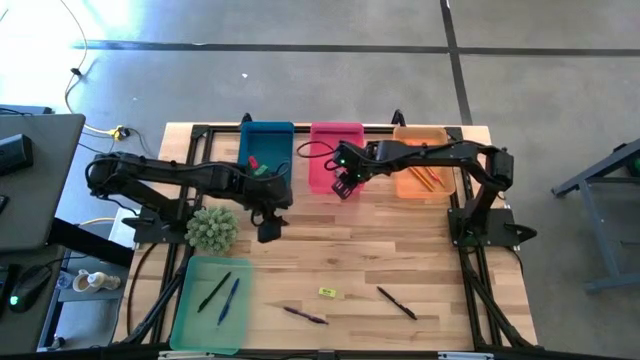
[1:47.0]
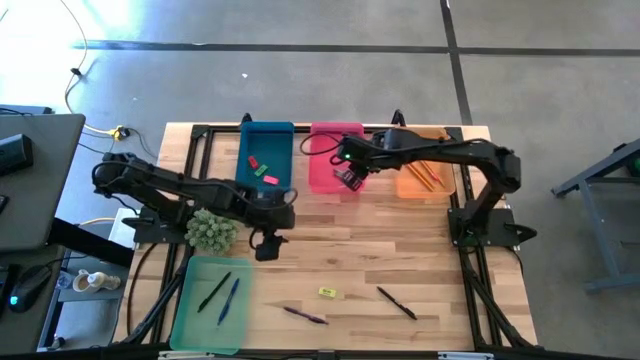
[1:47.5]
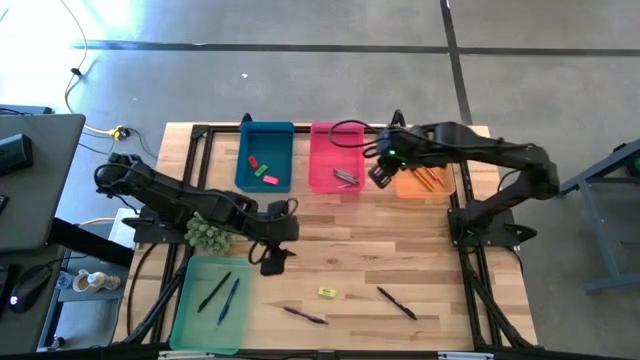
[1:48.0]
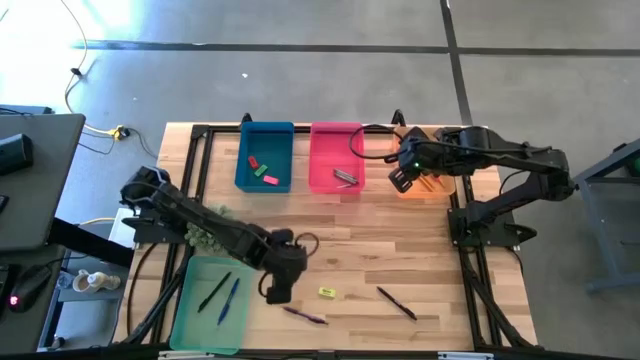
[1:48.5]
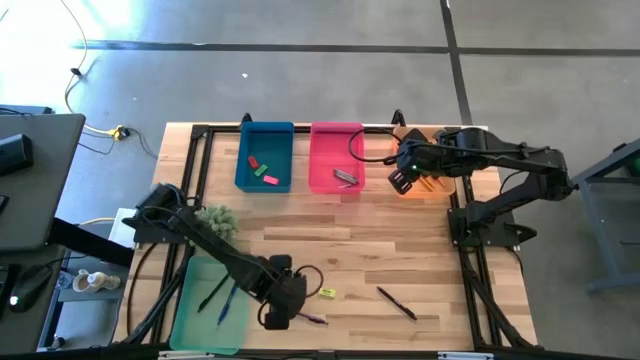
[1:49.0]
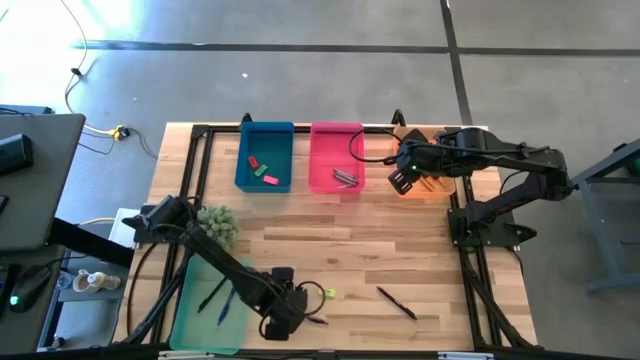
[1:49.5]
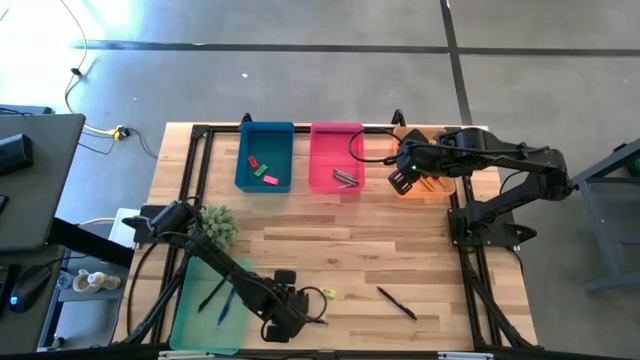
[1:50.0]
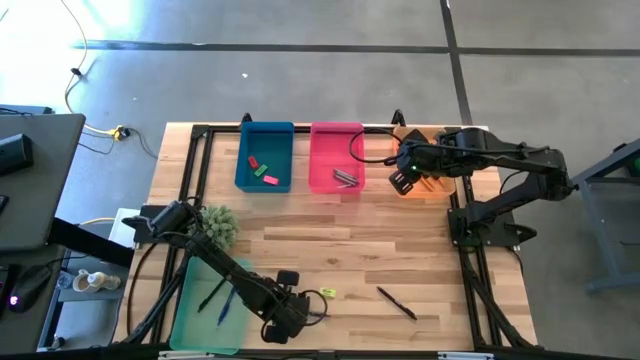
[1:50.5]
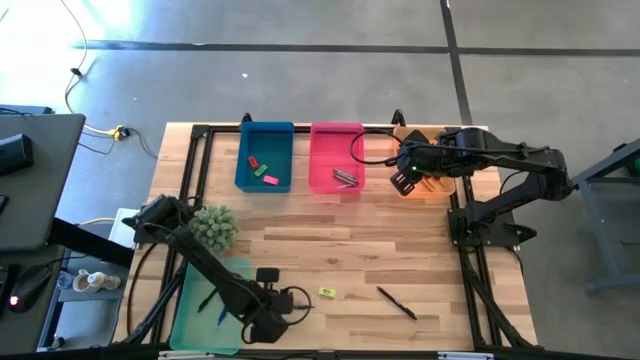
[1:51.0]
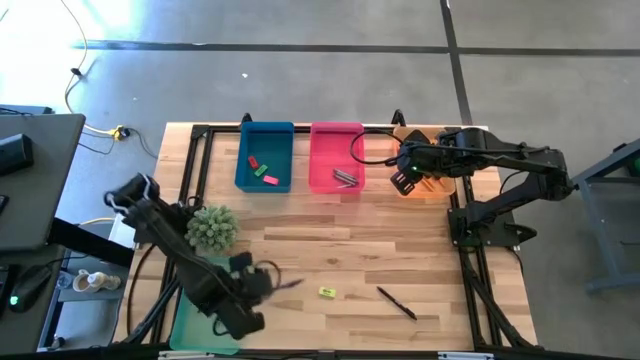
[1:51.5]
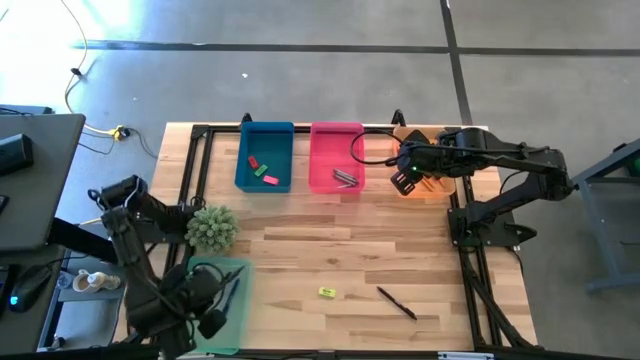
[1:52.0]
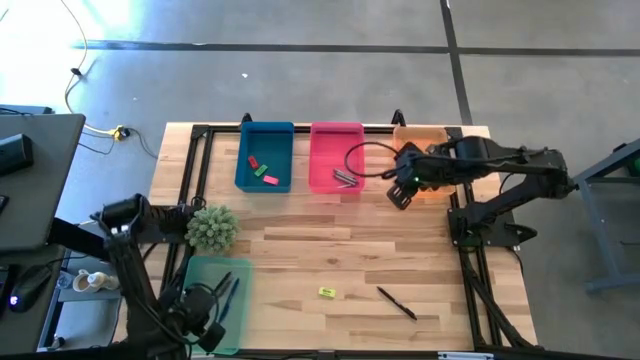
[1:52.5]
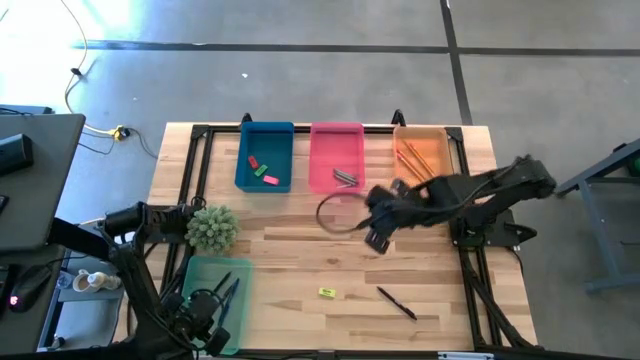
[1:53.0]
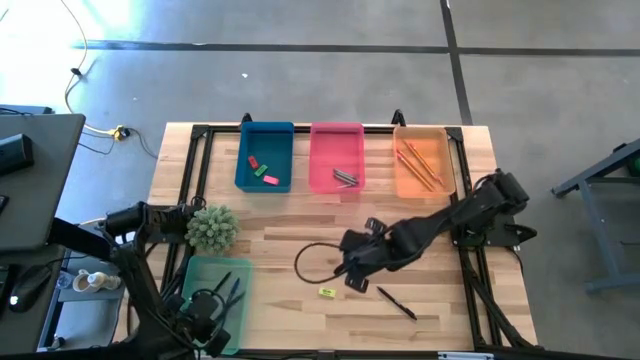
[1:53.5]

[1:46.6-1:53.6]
Task: Sort crayons/erasers/pens/pencils in bins
Put the purple pen into the blue bin

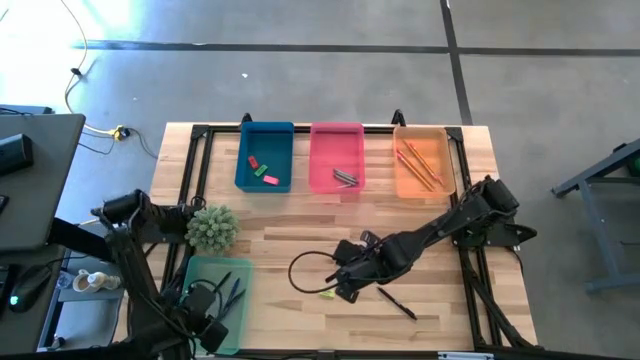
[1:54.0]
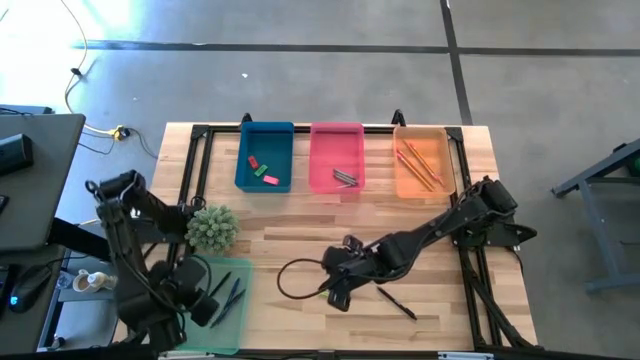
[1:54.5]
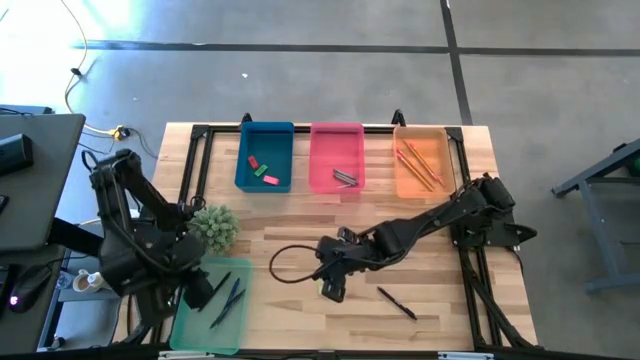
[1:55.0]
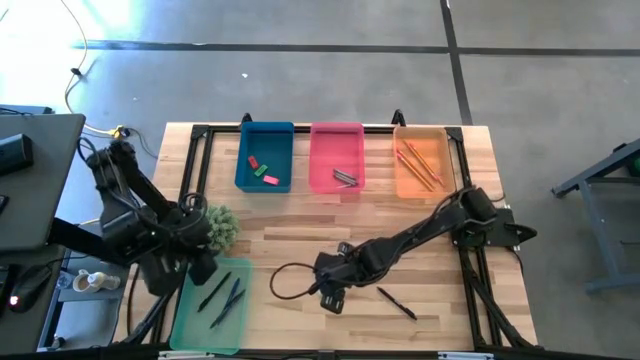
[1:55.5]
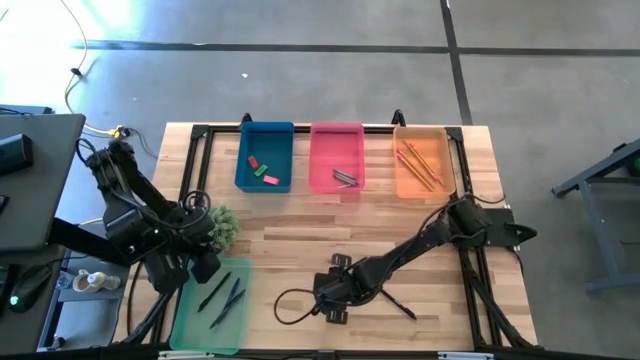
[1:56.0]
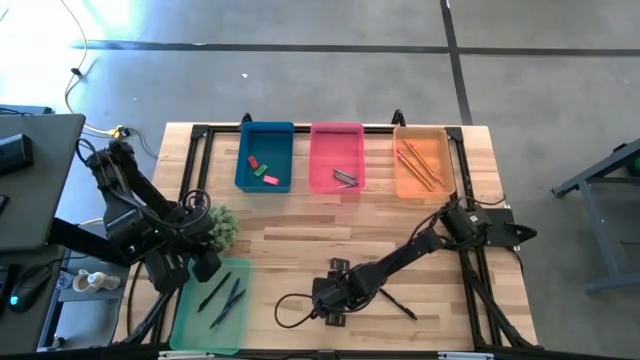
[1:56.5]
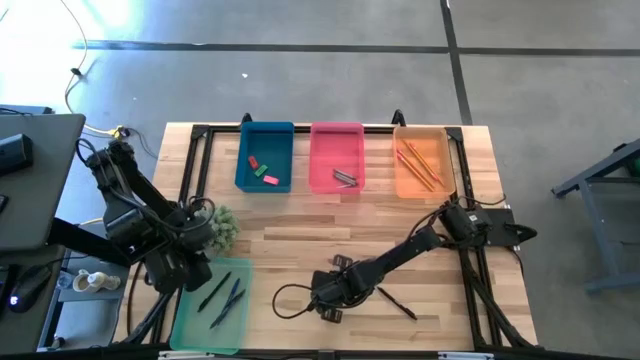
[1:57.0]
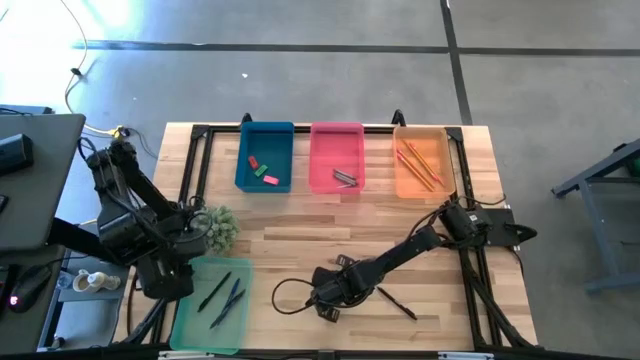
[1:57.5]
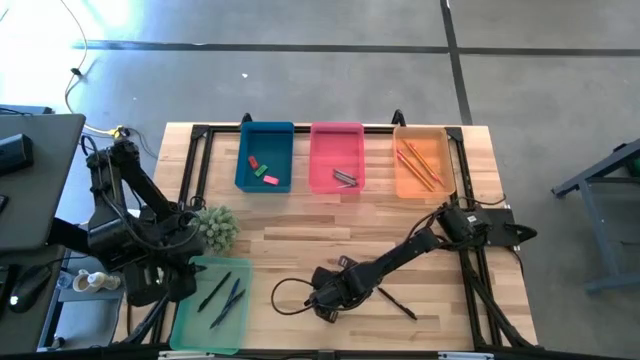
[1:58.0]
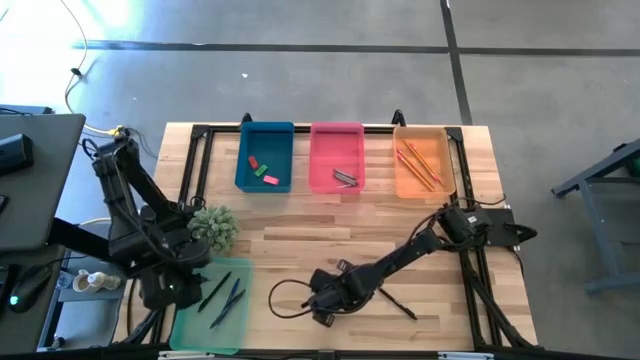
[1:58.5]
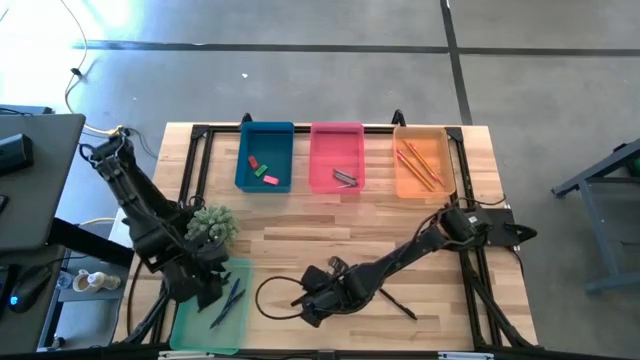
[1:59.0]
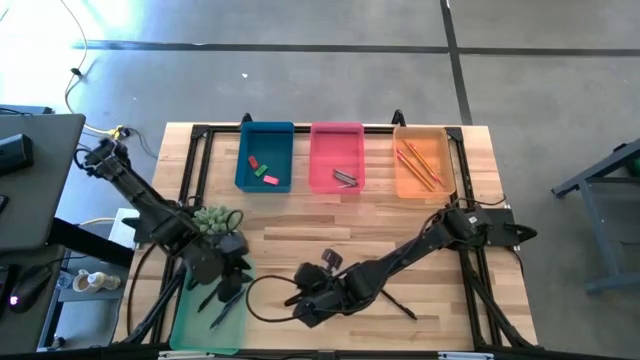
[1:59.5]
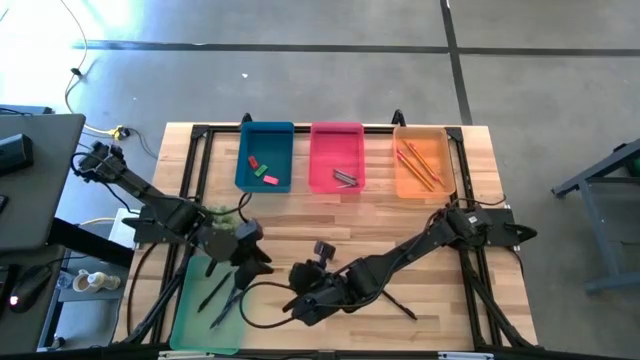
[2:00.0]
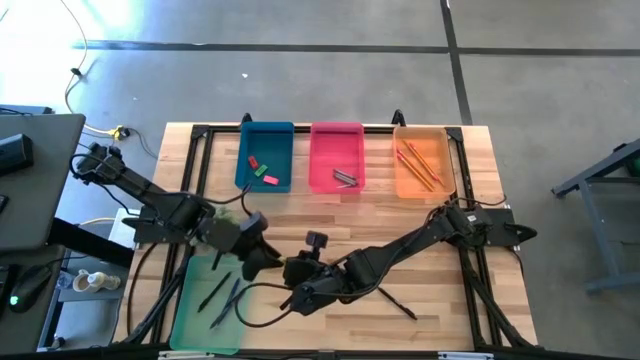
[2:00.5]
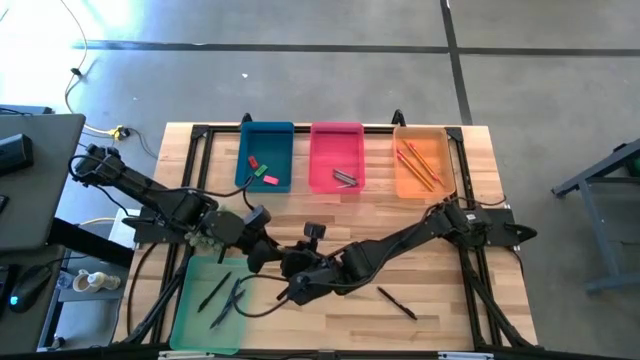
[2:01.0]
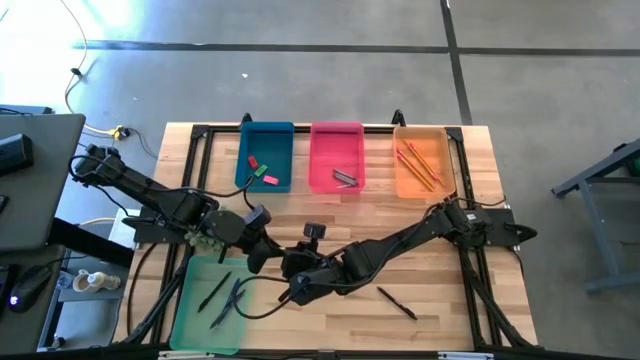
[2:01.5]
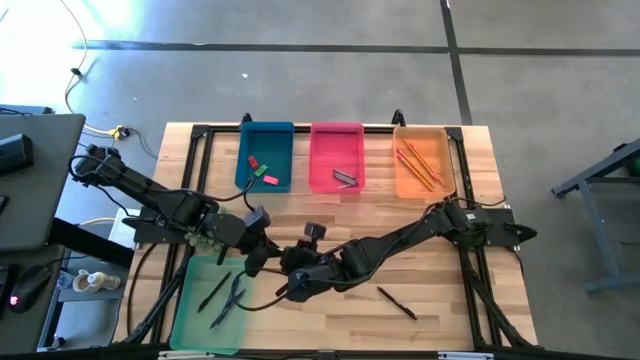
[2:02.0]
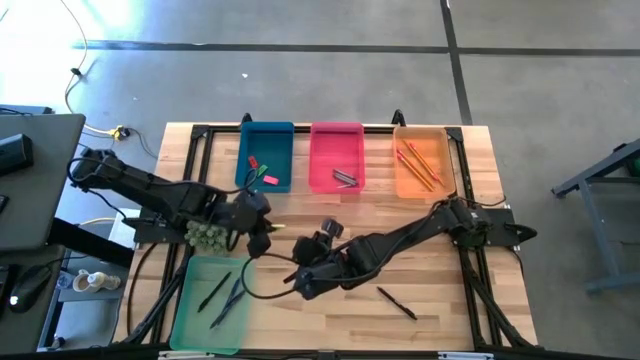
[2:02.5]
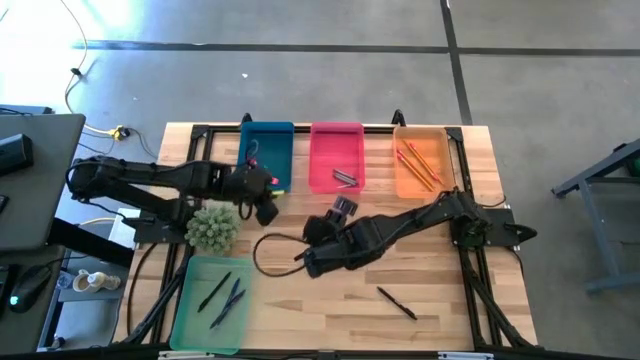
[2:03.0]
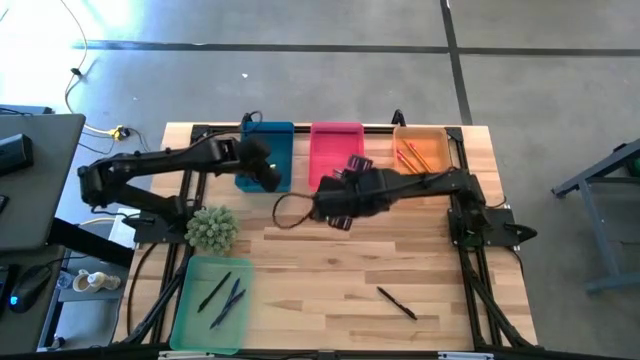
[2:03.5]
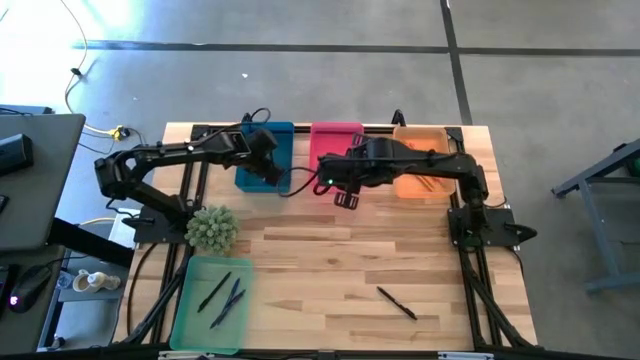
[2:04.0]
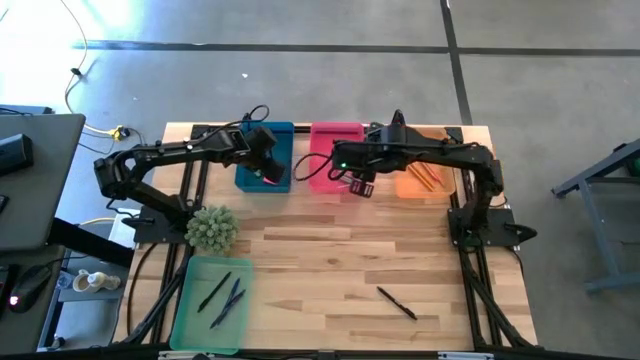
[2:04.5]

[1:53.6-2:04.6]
Put the light green eraser into the blue bin

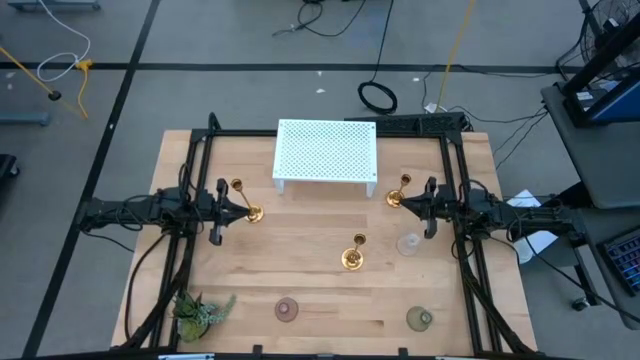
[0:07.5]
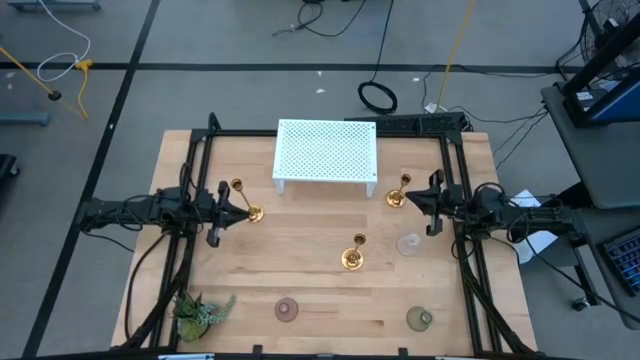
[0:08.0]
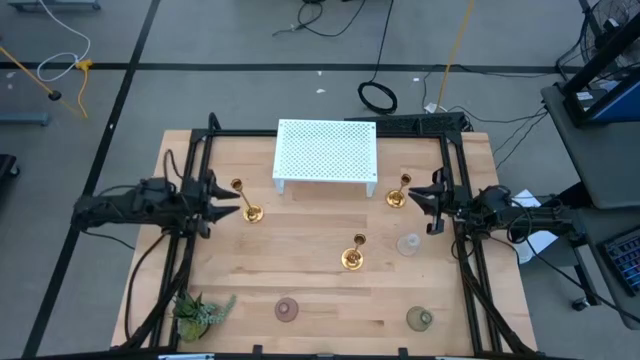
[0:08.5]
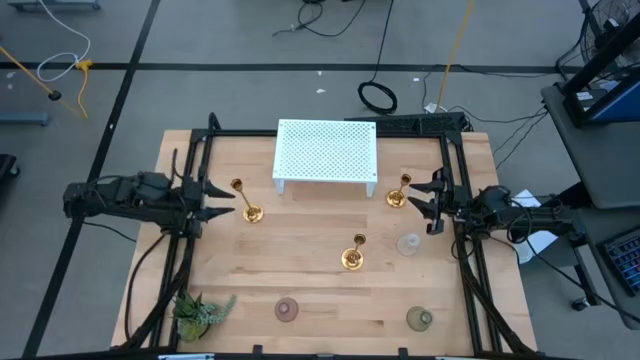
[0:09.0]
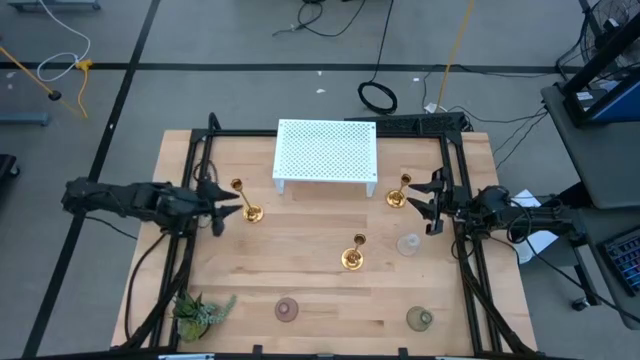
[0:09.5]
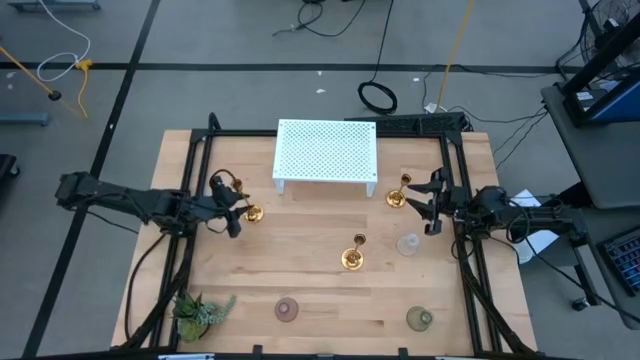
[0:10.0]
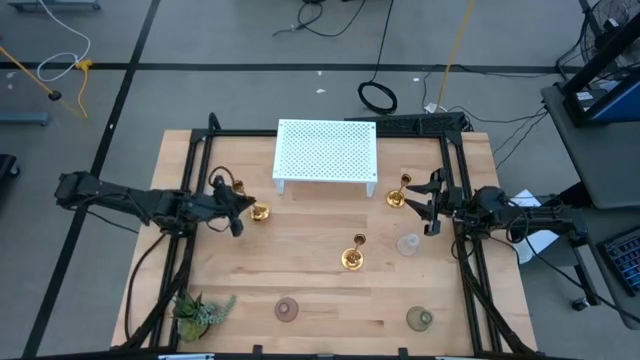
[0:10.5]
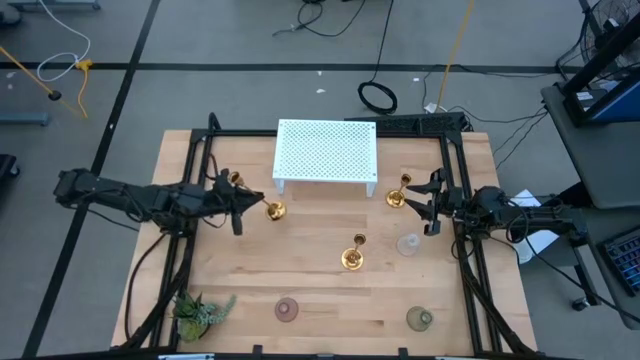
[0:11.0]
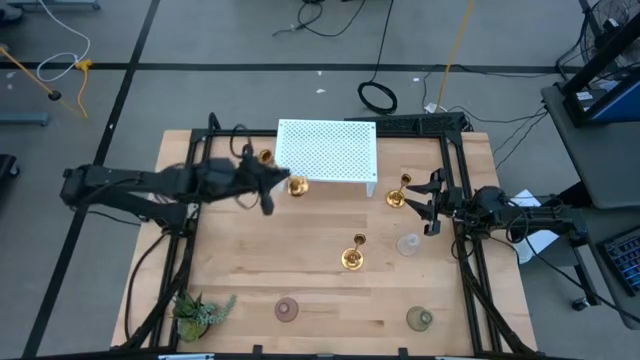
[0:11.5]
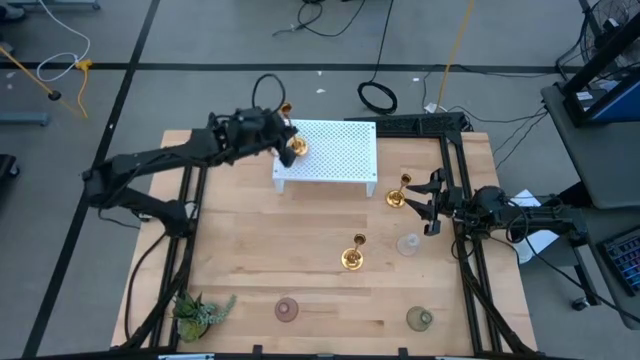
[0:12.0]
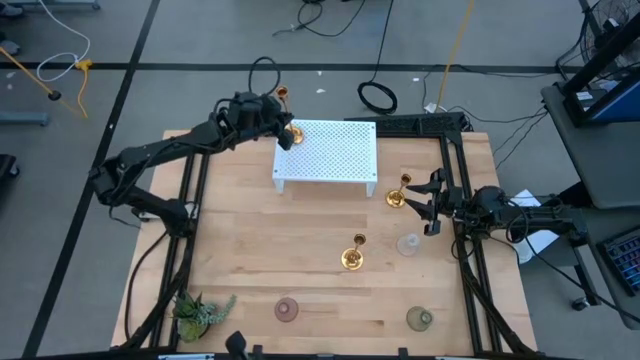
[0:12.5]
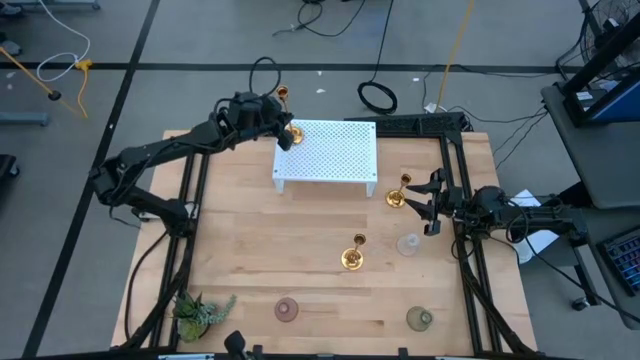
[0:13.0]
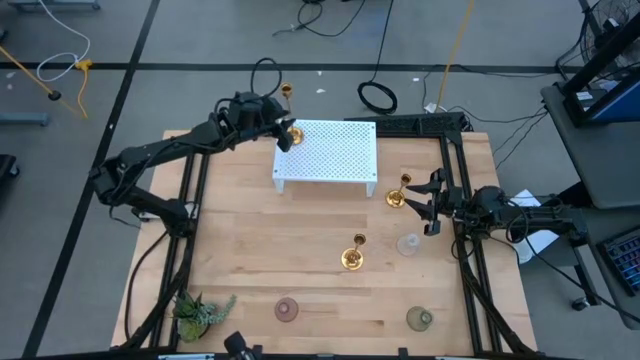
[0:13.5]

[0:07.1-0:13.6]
Task: Pick & Place candle stick holders
Put the middle left golden candle holder on the shelf
